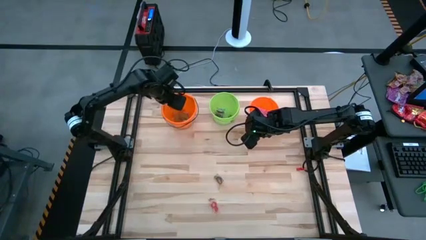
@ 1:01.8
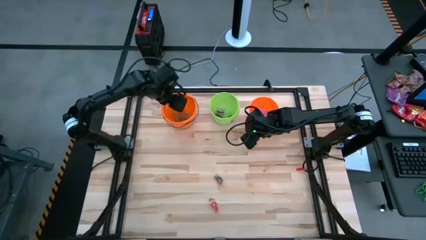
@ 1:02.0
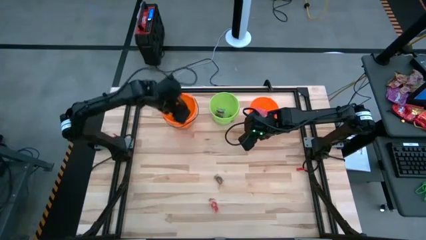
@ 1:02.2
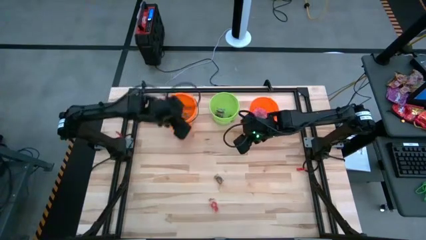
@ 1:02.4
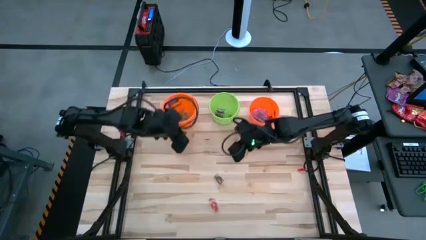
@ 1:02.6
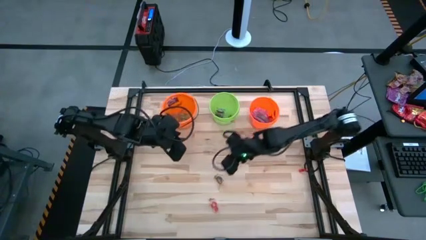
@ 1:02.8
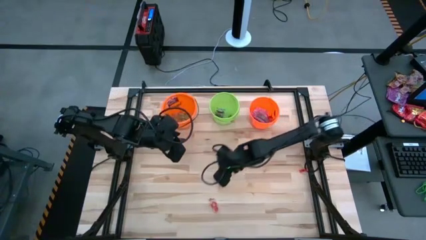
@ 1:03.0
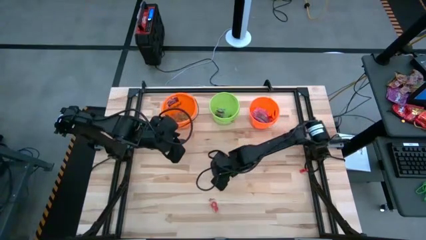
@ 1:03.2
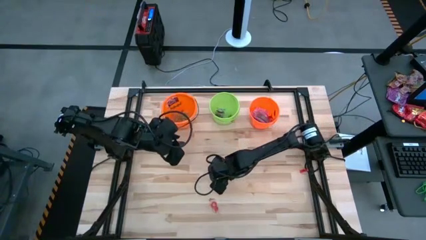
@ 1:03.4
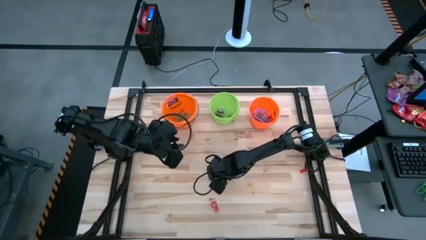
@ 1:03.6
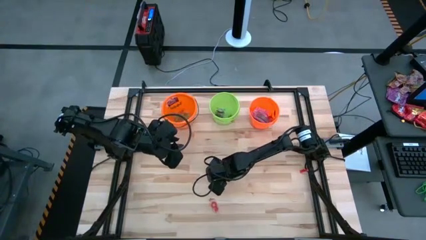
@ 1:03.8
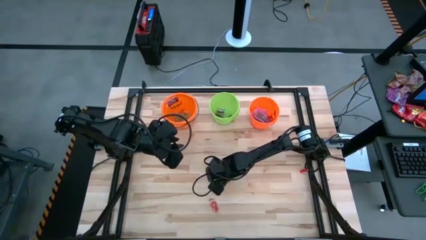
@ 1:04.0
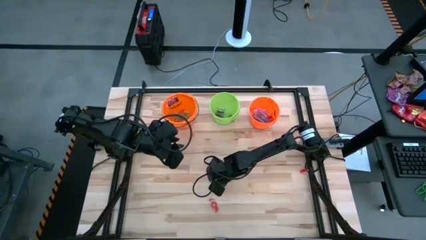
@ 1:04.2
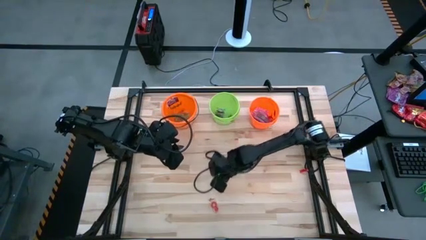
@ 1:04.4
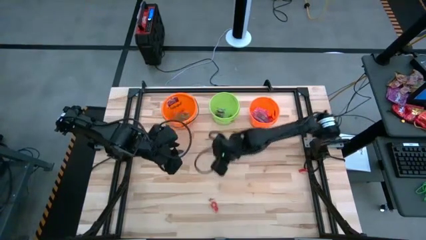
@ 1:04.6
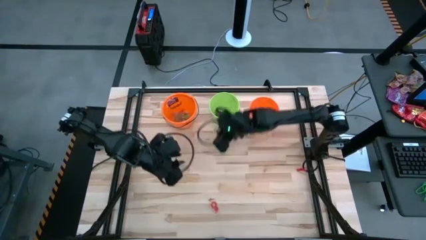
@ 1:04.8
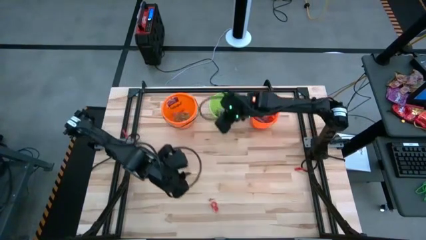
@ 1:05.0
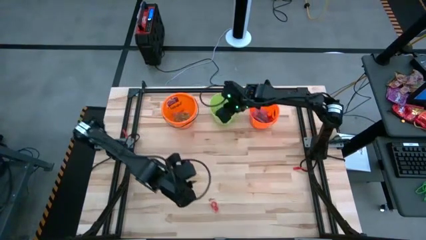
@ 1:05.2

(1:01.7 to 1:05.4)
Task: Sort candy by brand, put in halloween buckets
Put the black candy into the green bucket

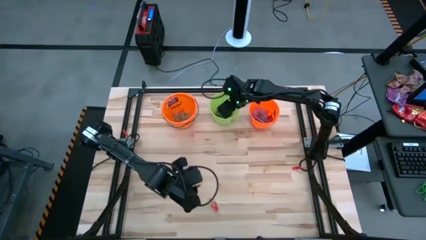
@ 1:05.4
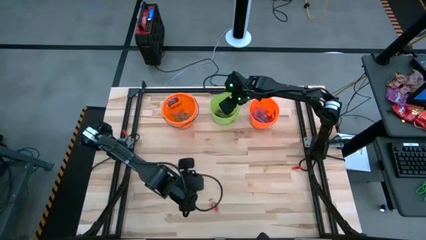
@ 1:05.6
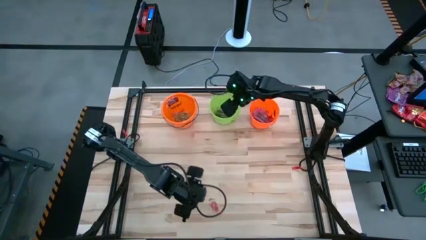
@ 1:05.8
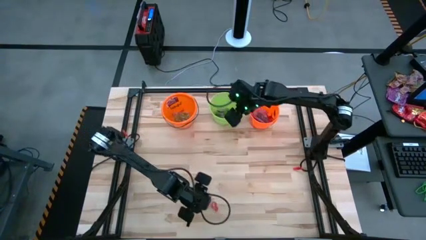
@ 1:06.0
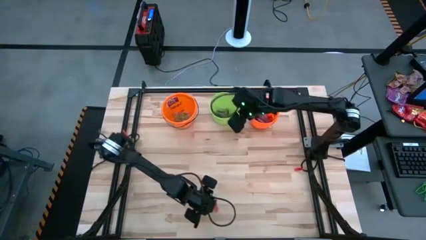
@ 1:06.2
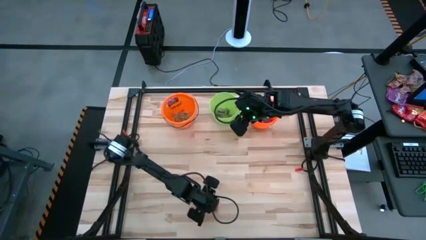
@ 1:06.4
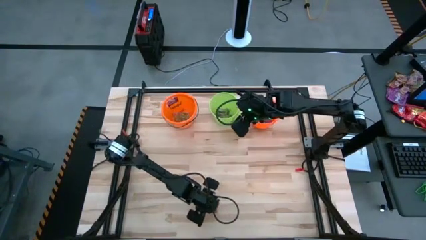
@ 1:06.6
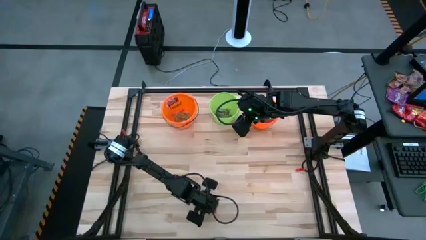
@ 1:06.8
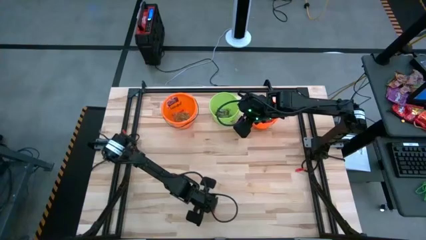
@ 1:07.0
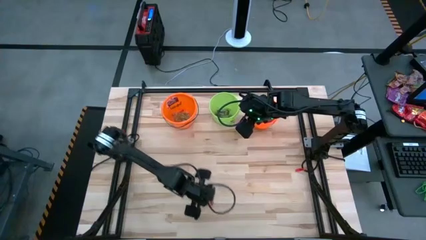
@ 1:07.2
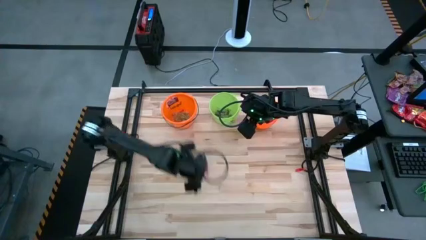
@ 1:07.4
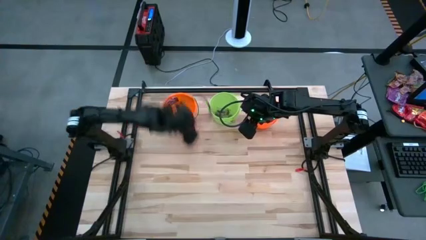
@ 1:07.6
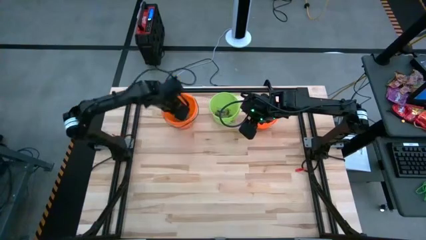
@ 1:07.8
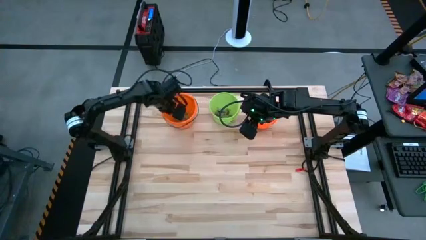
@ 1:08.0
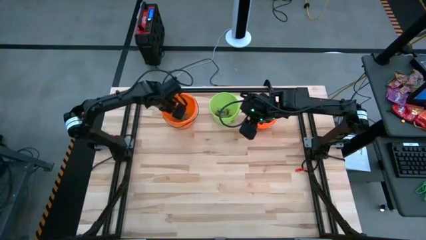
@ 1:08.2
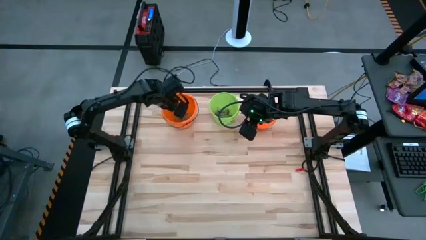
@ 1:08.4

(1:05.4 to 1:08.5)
Put the red gummy into the left orange bucket

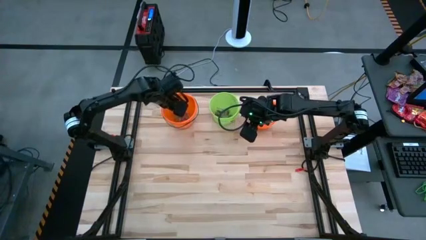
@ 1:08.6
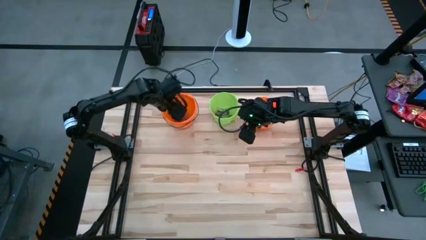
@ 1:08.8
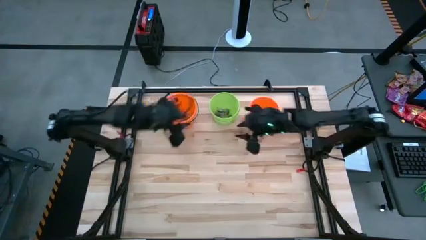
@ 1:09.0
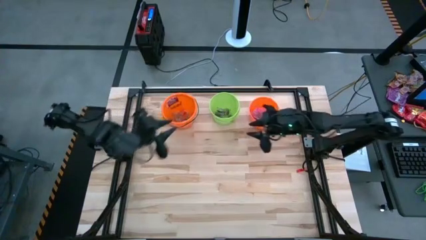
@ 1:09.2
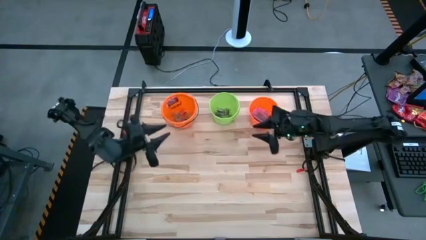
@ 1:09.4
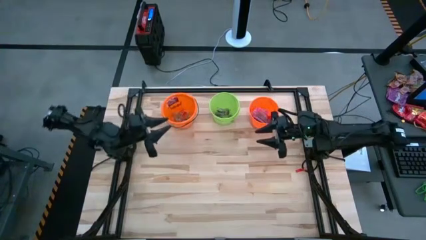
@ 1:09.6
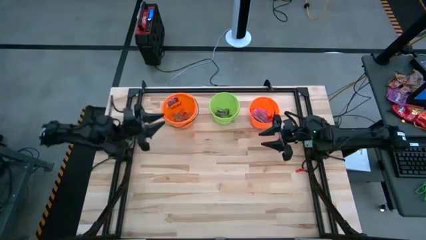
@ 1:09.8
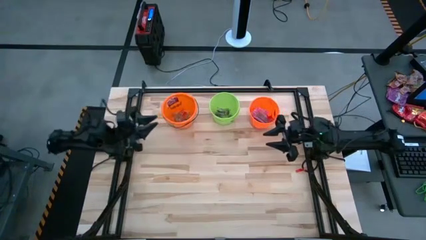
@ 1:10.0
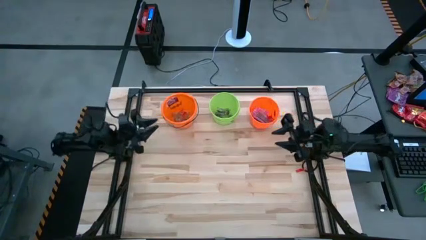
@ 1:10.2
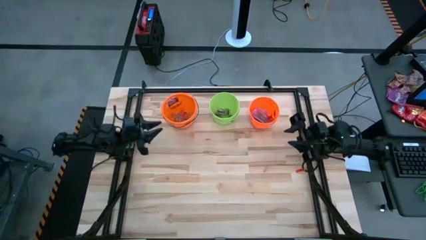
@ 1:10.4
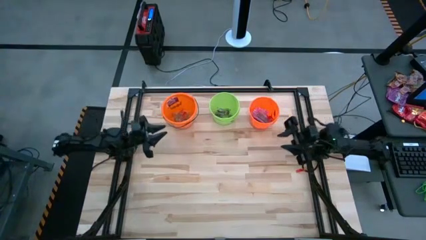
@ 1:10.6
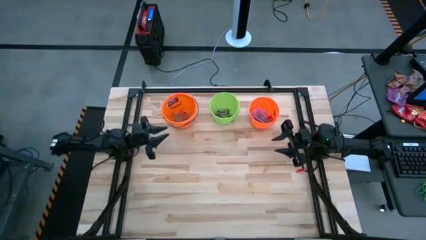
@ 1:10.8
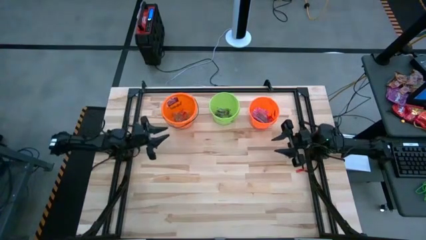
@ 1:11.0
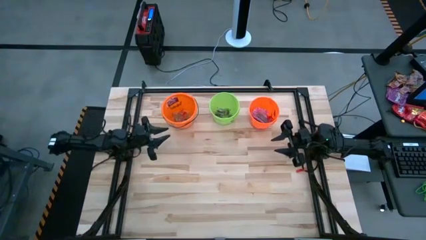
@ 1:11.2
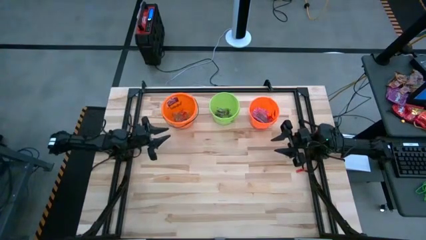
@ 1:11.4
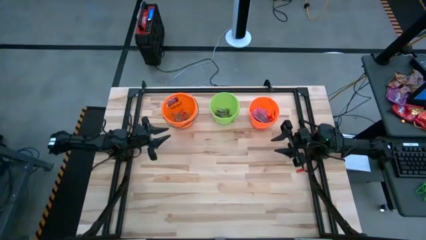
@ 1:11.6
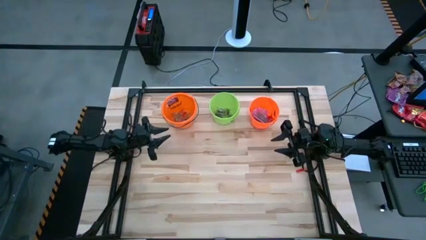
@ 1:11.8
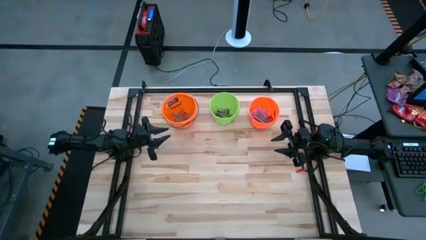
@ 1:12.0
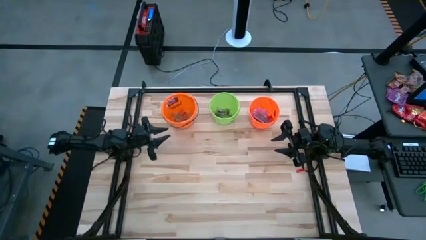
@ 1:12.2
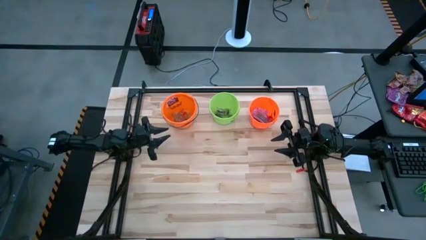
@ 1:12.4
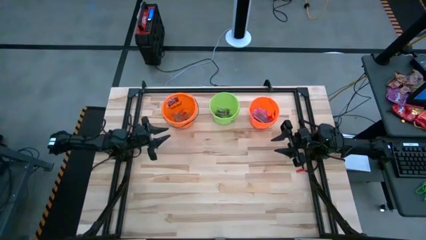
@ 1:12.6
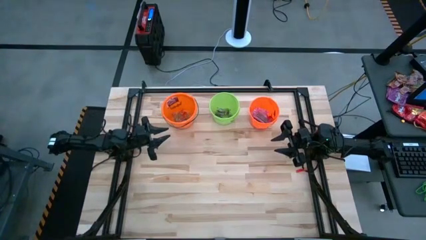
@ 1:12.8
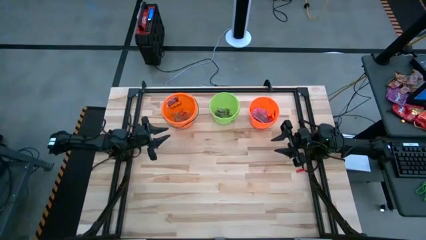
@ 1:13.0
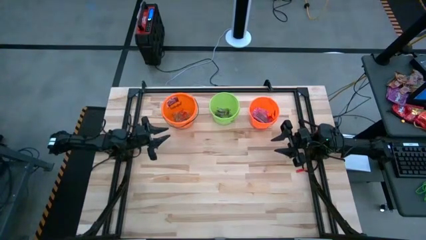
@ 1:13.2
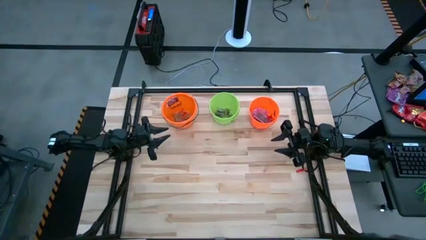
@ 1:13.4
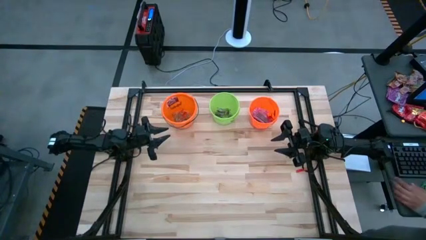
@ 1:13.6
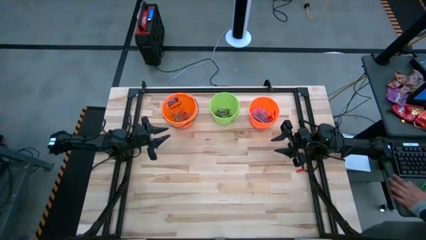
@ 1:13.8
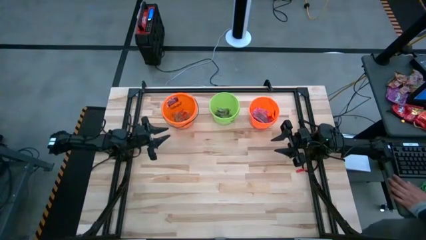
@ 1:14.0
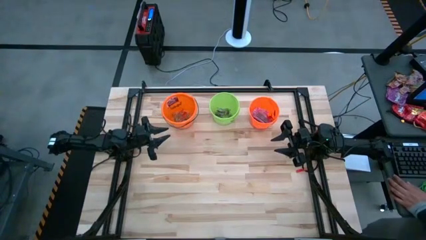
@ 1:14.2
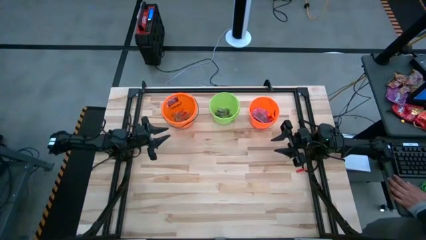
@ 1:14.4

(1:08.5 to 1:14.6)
Return to Home Position

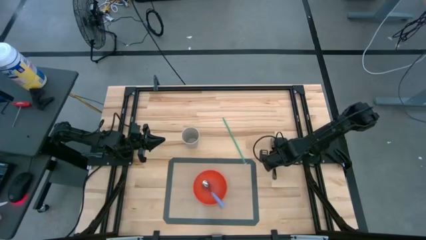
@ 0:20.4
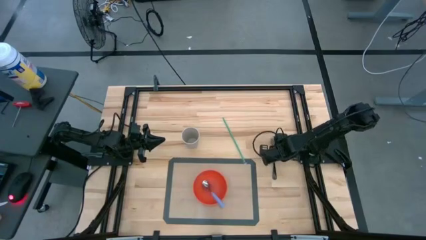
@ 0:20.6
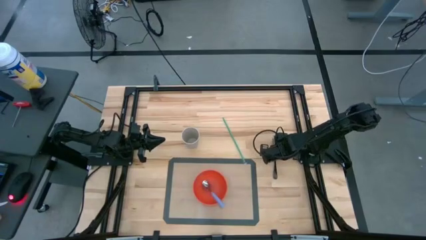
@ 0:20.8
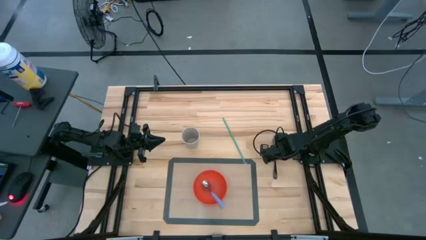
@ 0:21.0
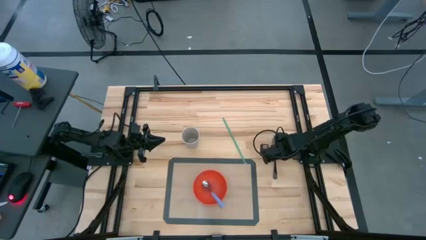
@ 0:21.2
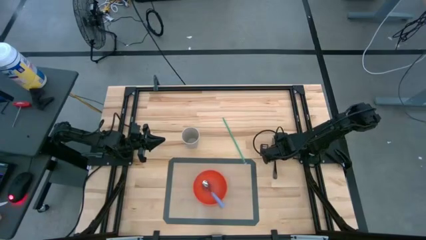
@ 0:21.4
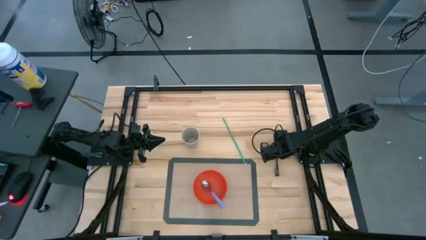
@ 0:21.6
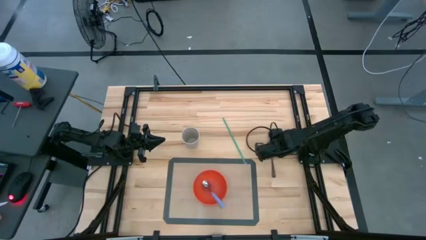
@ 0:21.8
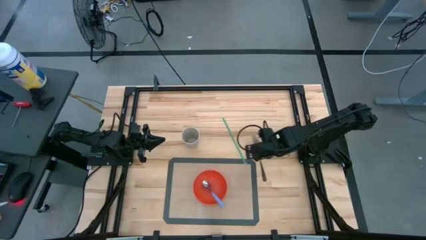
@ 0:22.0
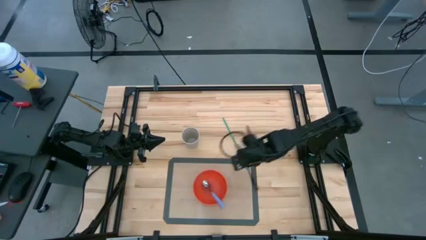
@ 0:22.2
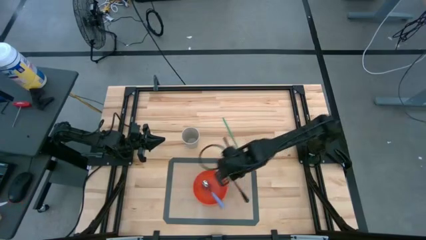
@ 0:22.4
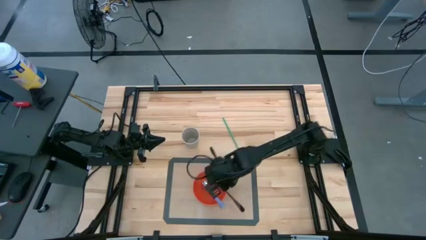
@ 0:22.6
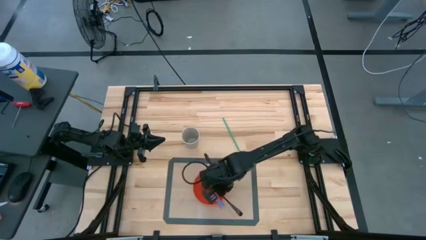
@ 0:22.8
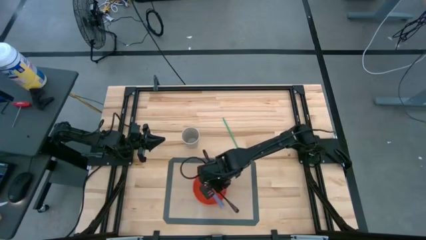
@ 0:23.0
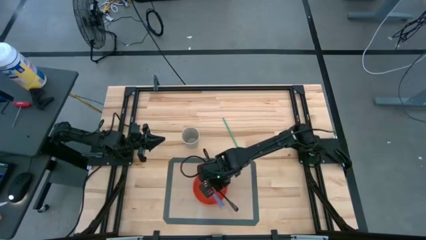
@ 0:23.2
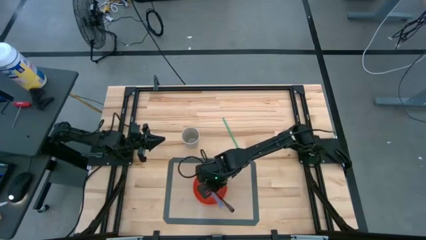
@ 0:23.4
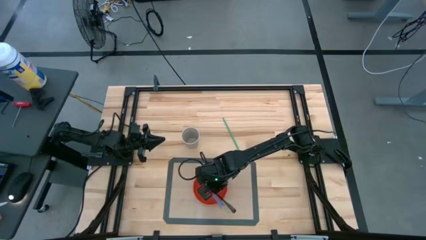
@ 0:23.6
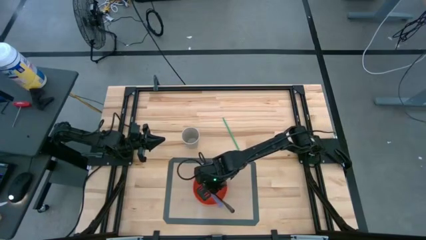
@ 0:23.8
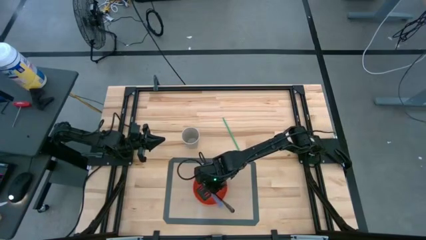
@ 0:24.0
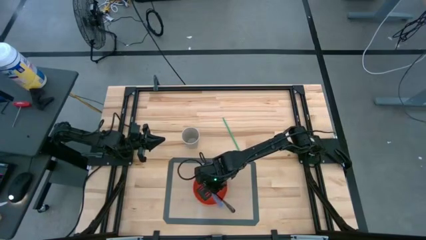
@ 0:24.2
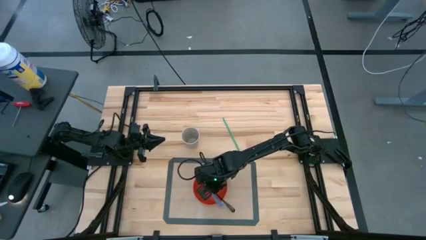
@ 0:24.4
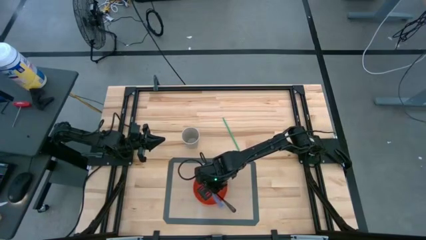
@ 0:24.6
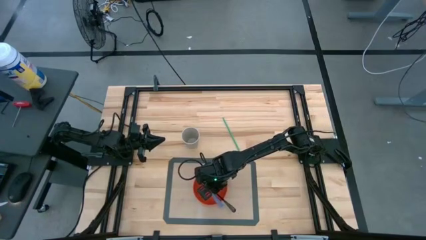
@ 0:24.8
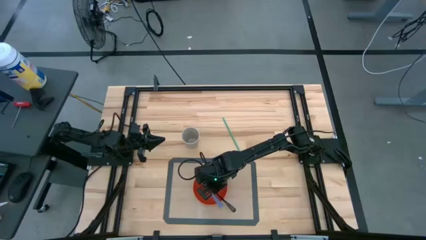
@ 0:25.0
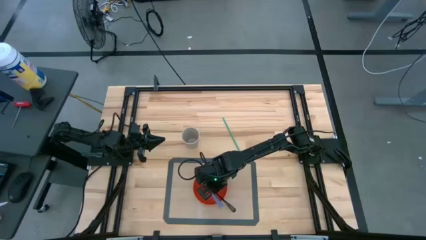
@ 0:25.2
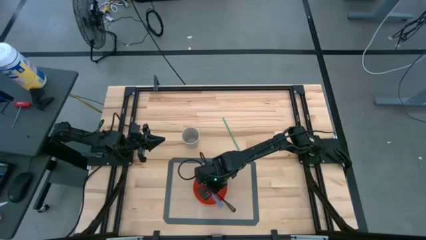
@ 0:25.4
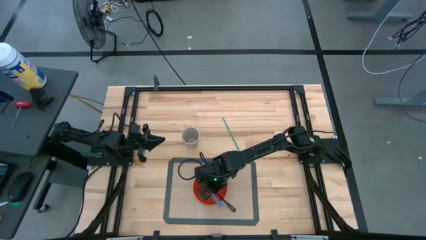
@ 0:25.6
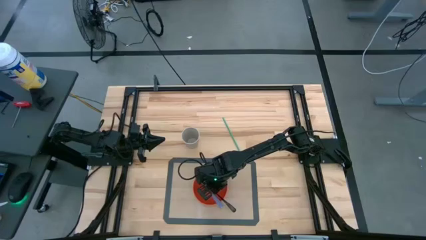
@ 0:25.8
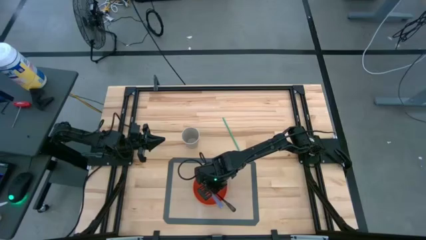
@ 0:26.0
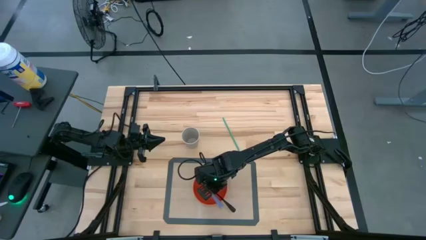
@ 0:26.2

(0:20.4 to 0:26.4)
Task: Pick & Place Utensil
Put the black fork into the orange bowl on the transparent mat
